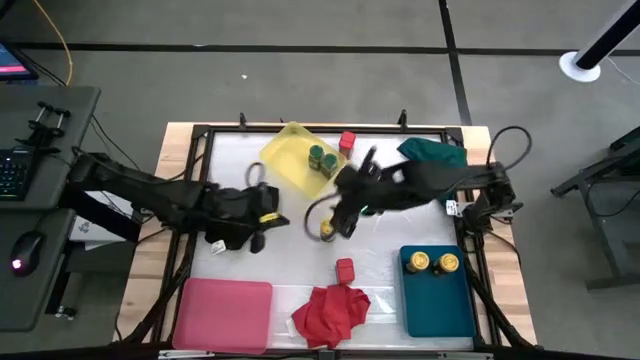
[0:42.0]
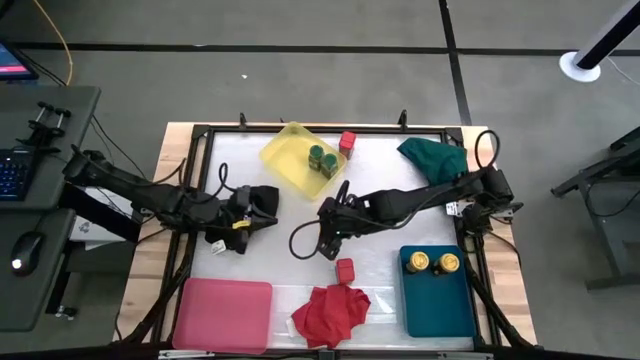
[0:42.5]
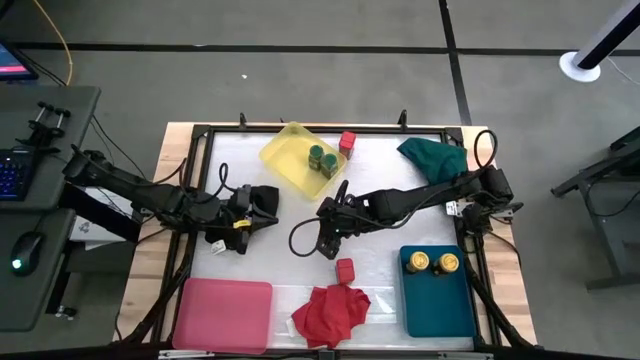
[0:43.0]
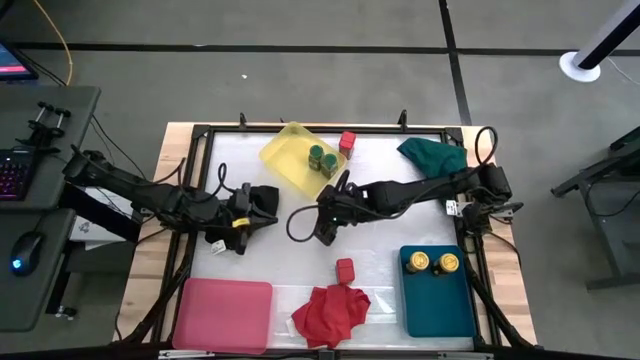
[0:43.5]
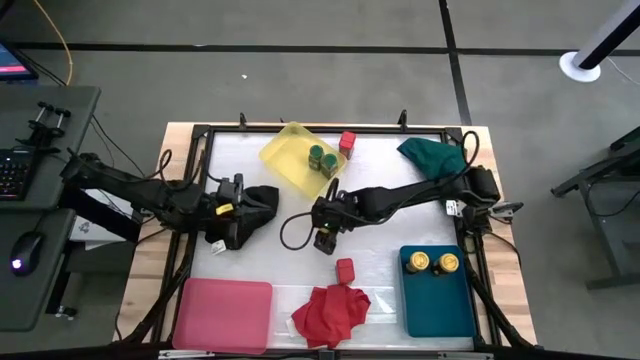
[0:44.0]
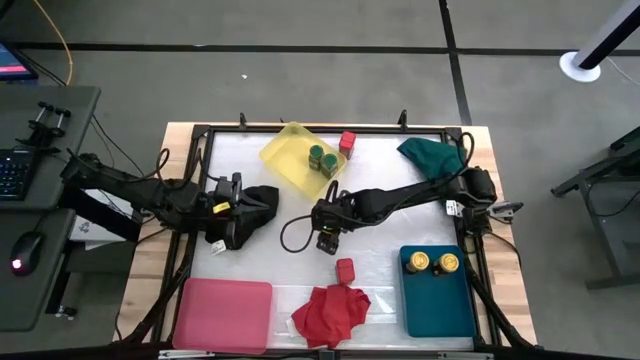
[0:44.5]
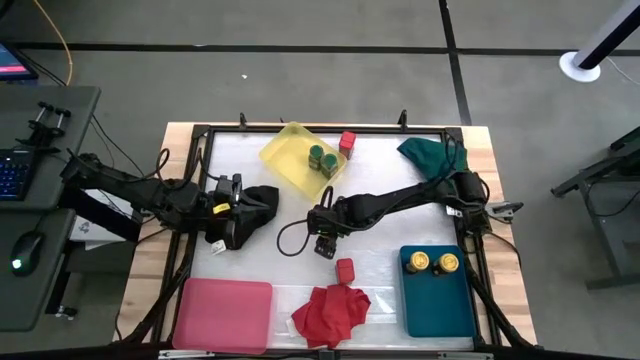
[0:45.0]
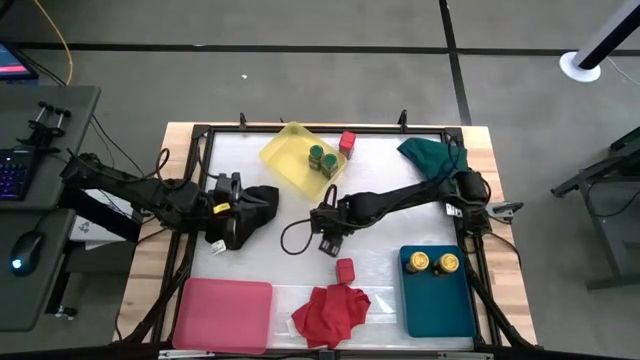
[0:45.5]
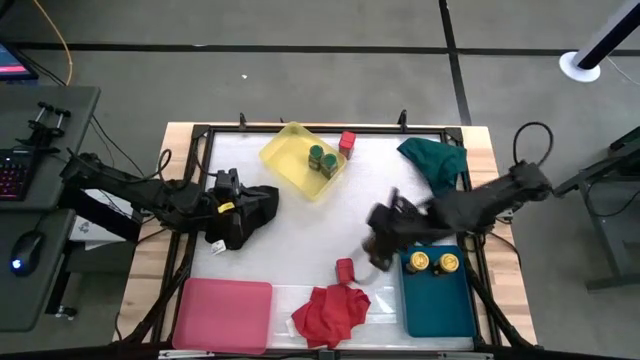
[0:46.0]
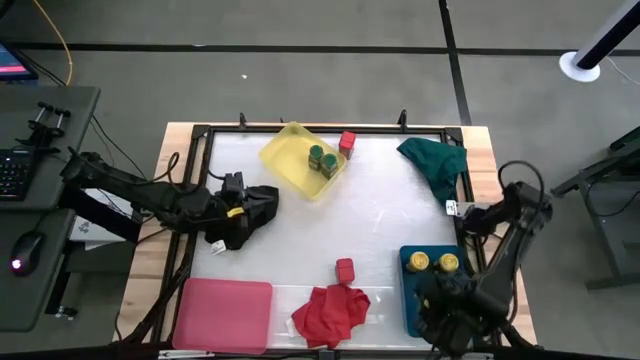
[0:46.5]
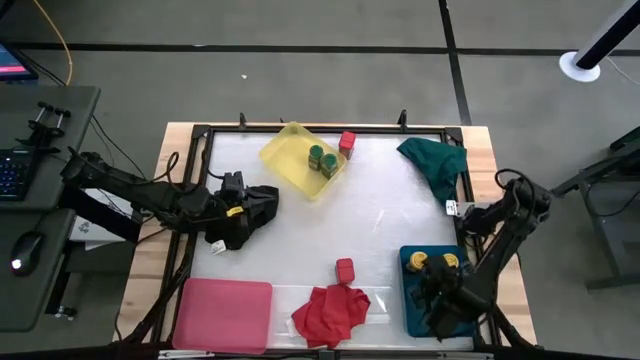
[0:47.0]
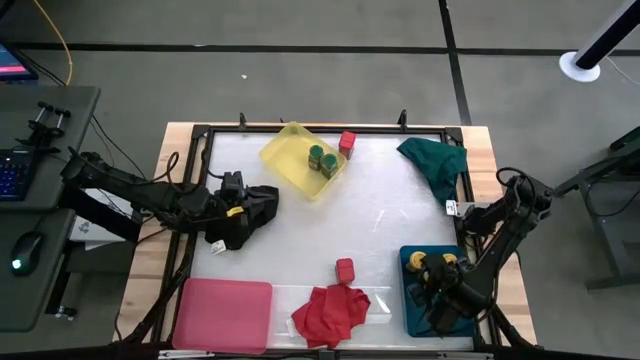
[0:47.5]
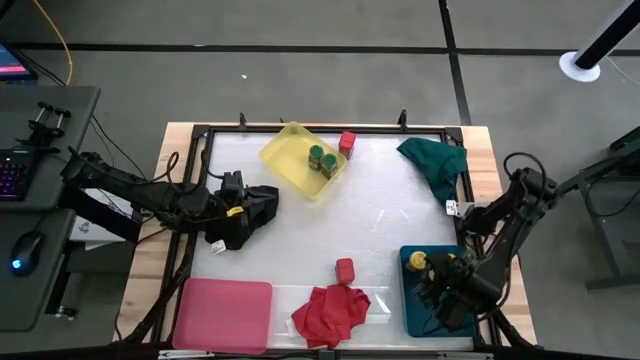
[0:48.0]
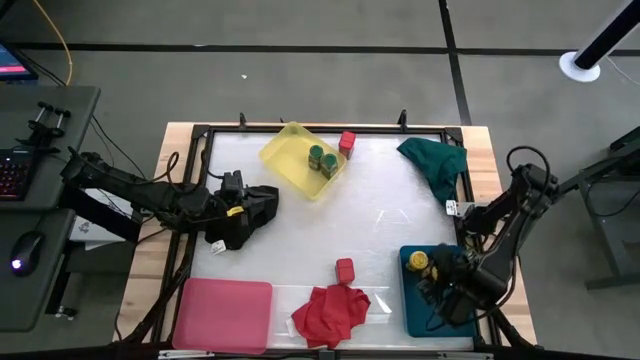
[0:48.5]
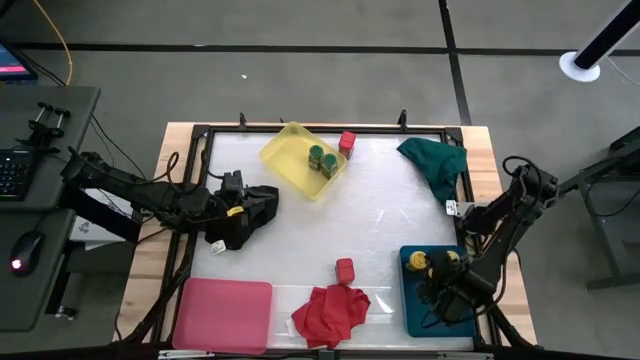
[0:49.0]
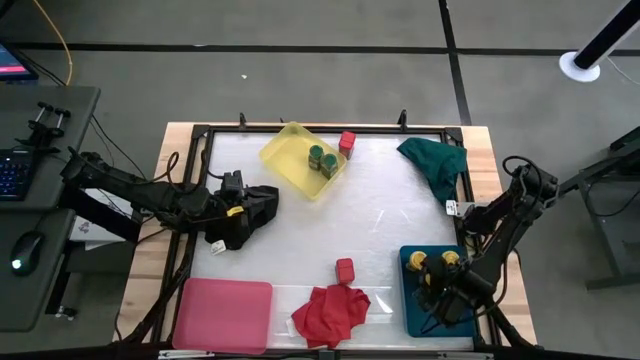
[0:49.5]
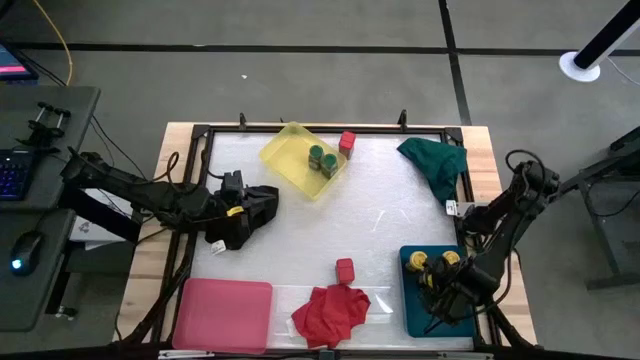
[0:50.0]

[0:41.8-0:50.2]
Task: Sort spices by type
Put the yellow seasoning bottle into the blue bin

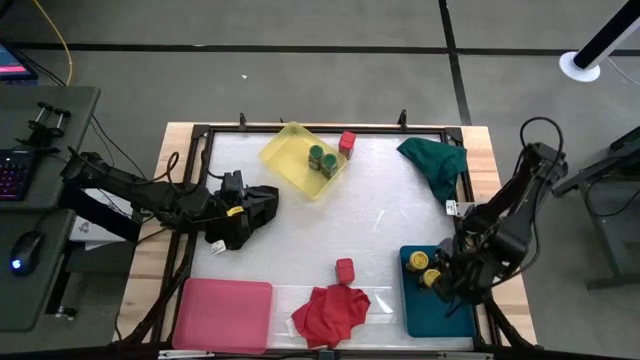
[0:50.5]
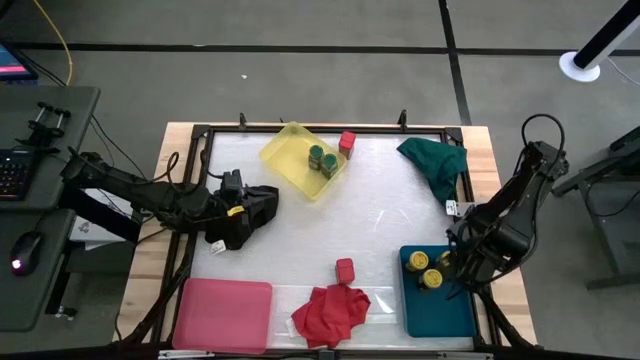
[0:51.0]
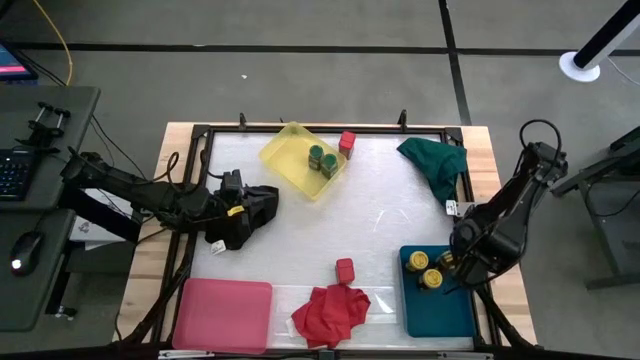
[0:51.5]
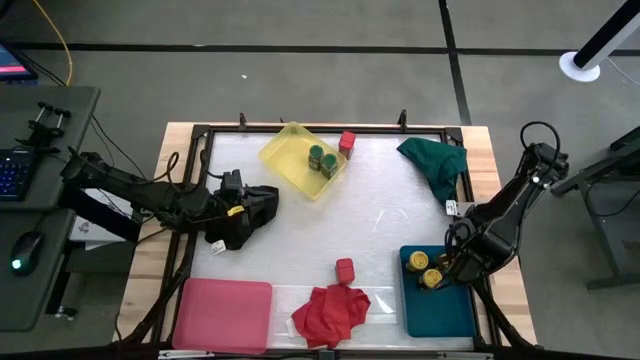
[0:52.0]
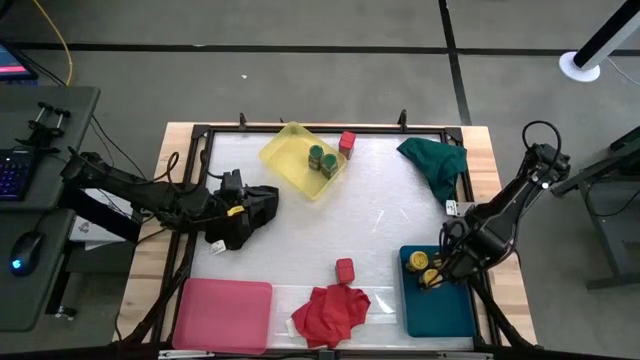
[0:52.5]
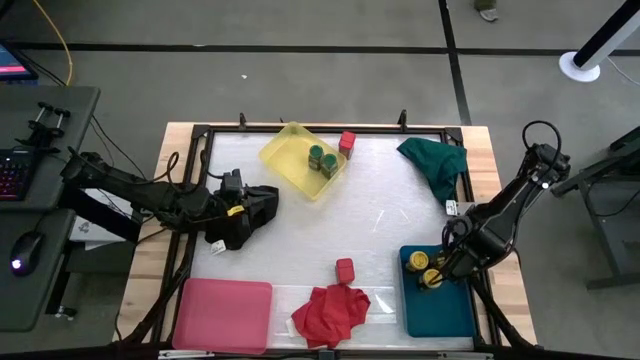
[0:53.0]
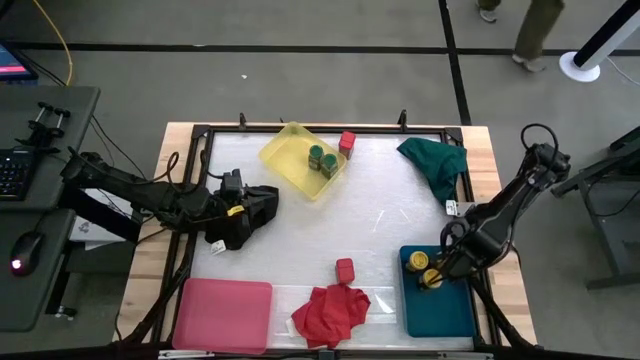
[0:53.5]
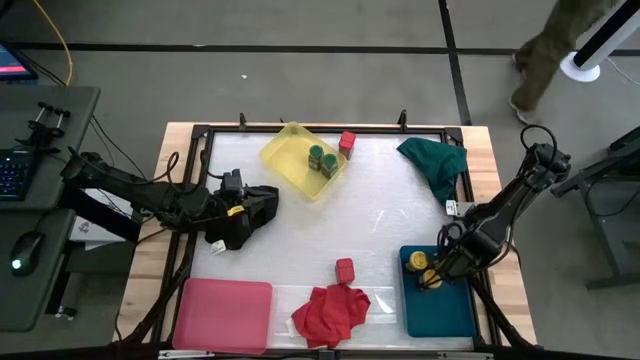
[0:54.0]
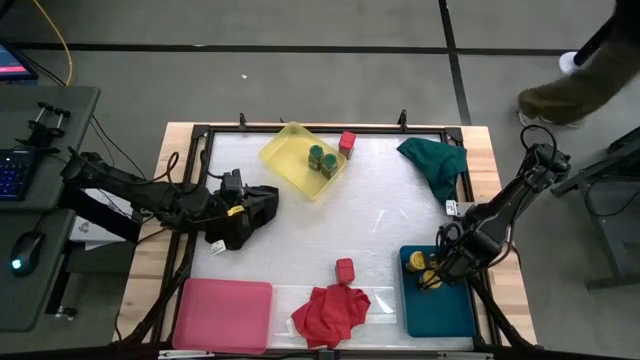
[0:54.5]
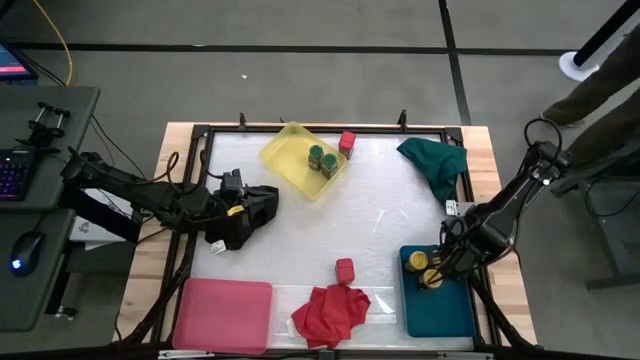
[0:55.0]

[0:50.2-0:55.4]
Adjust the top right yellow seasoning bottle

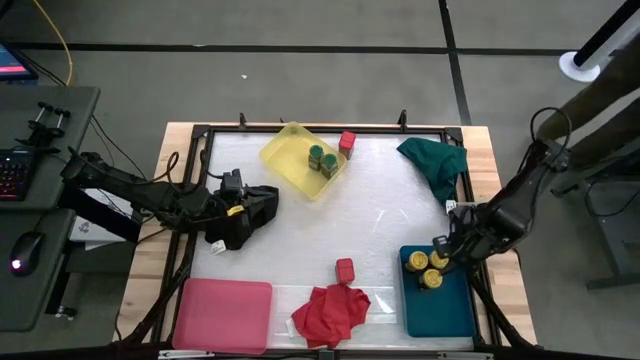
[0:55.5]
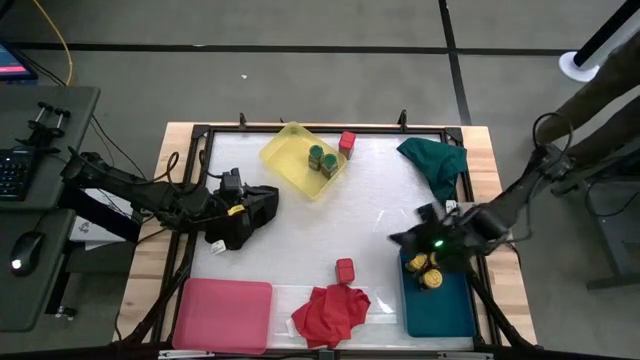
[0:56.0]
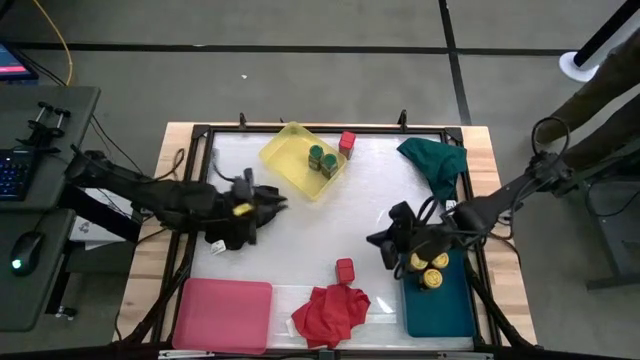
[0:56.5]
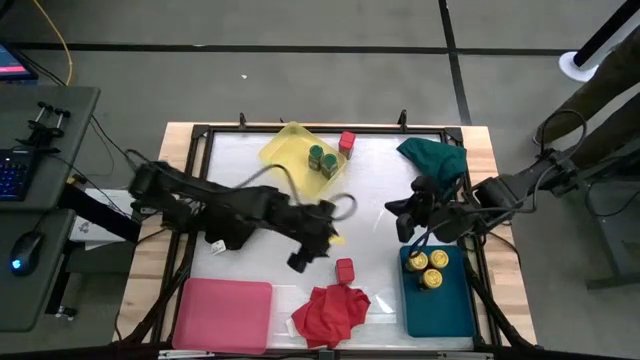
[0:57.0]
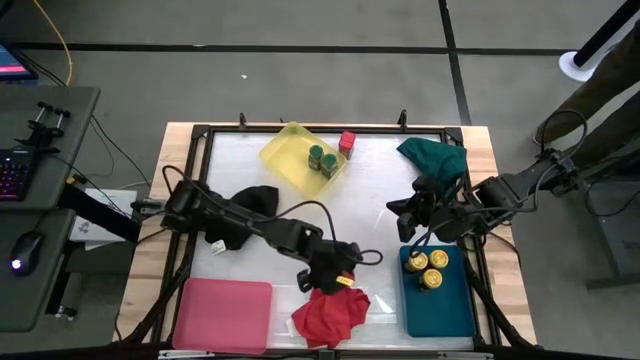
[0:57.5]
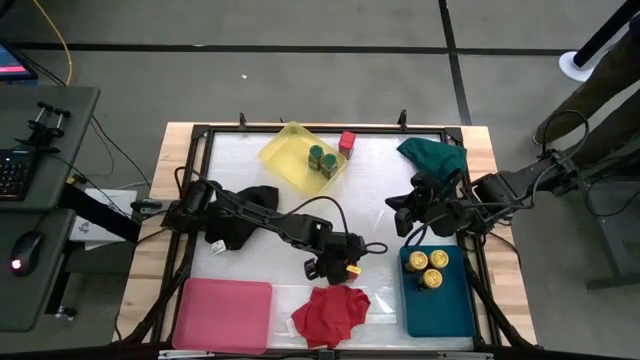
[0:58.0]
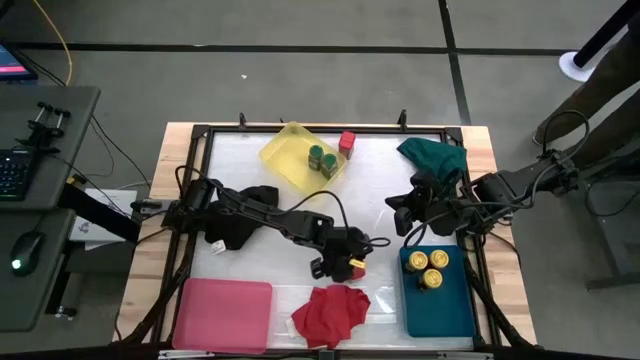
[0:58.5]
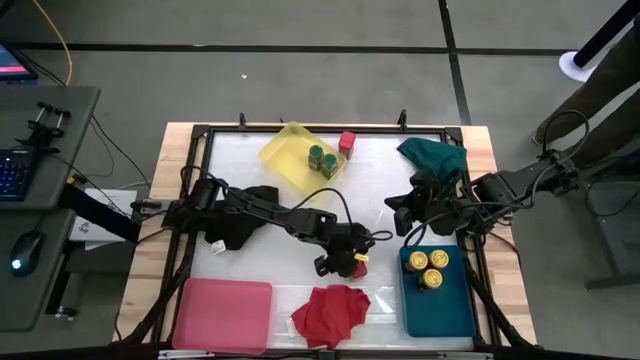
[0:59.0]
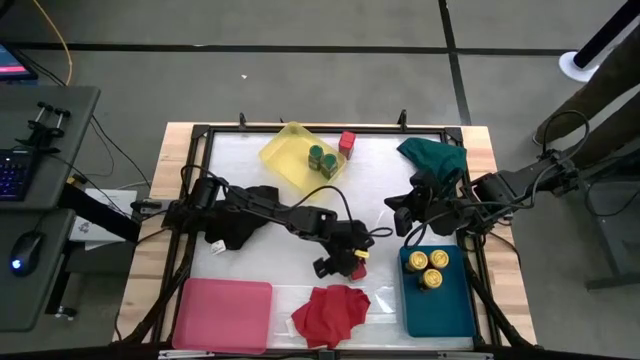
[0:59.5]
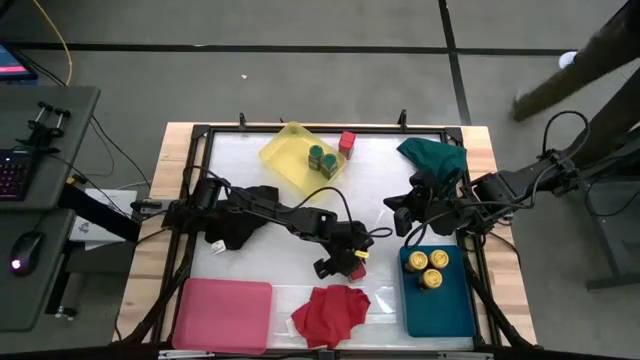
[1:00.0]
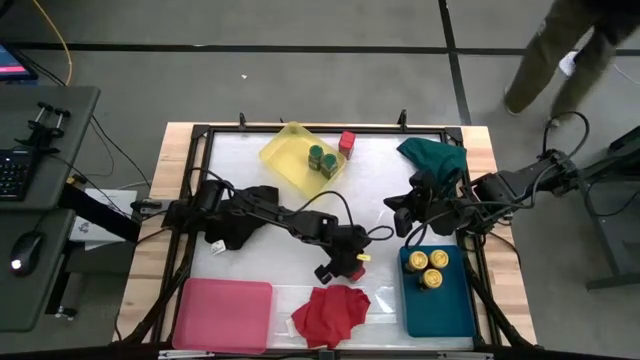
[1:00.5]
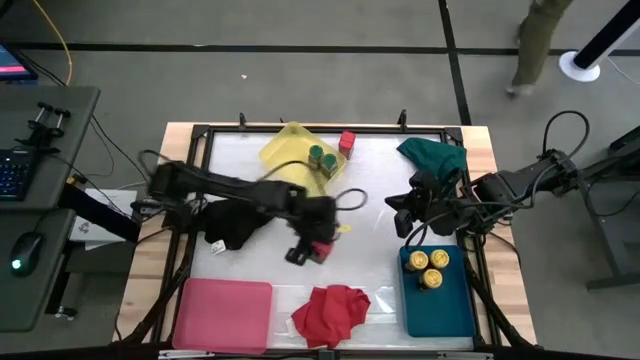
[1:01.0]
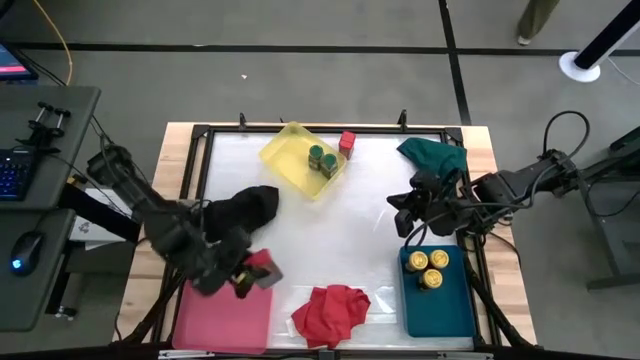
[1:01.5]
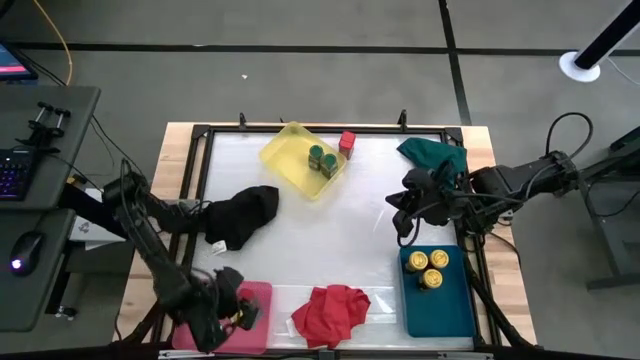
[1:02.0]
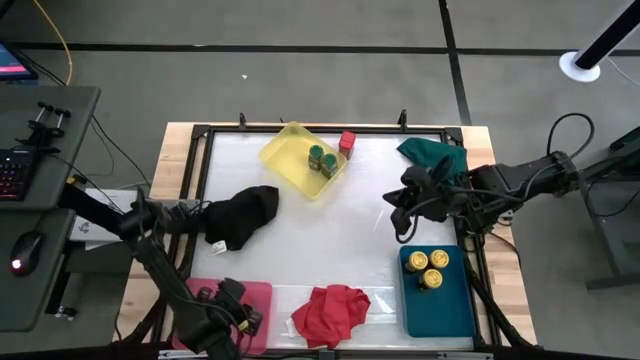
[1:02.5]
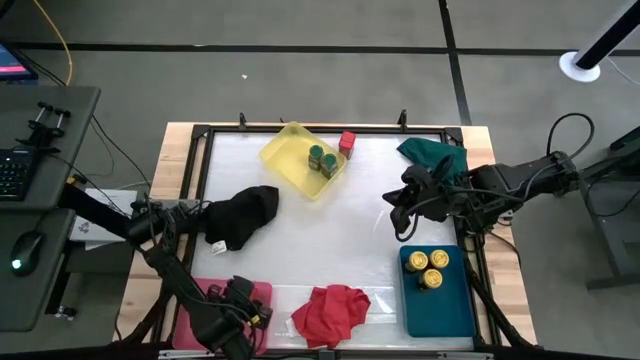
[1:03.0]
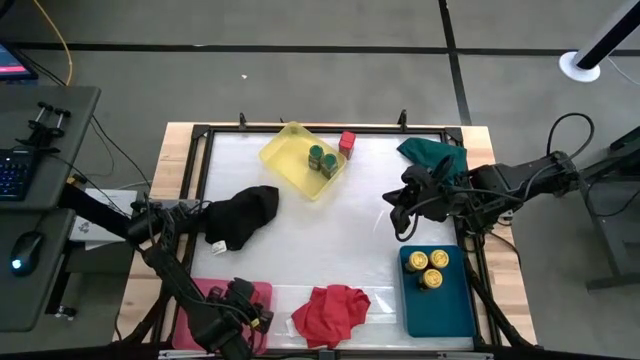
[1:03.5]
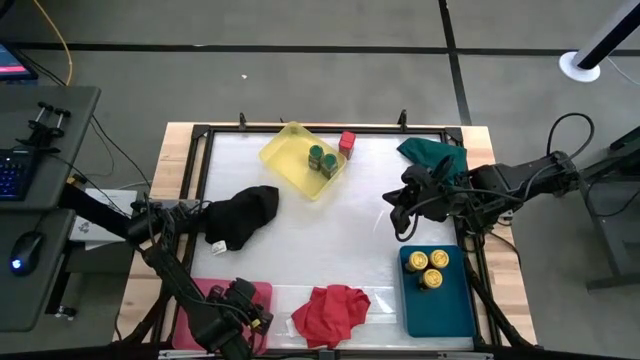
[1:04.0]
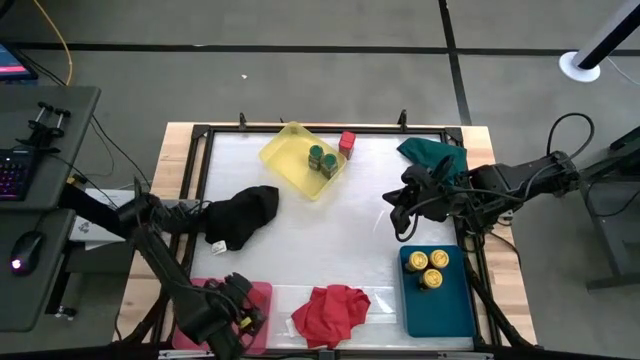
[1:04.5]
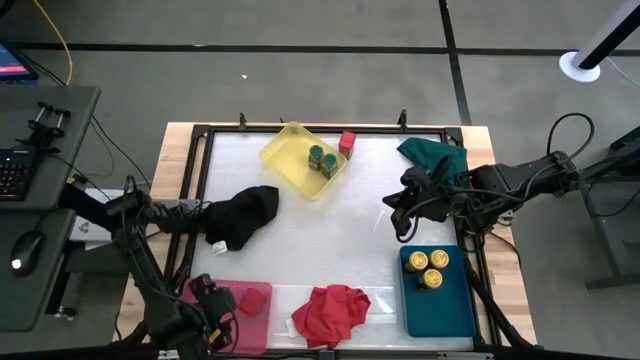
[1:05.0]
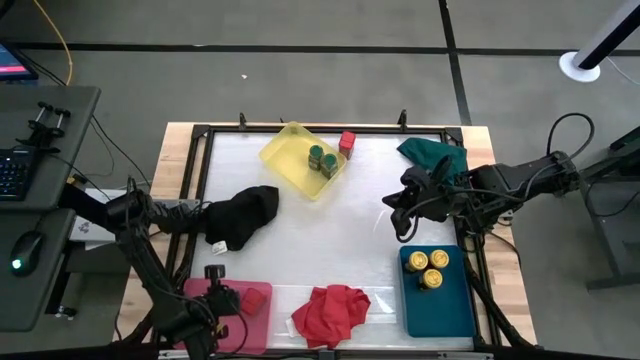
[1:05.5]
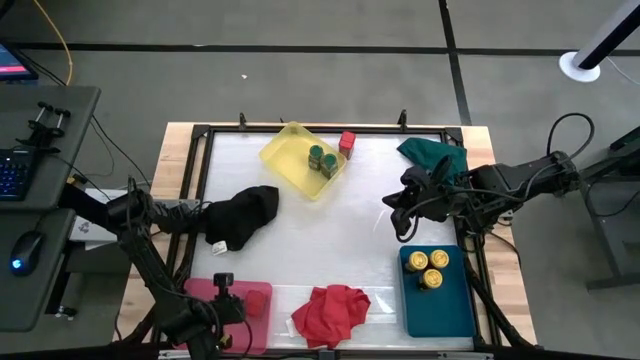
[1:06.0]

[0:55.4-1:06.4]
Put the bottom red seasoning can into the red bin
